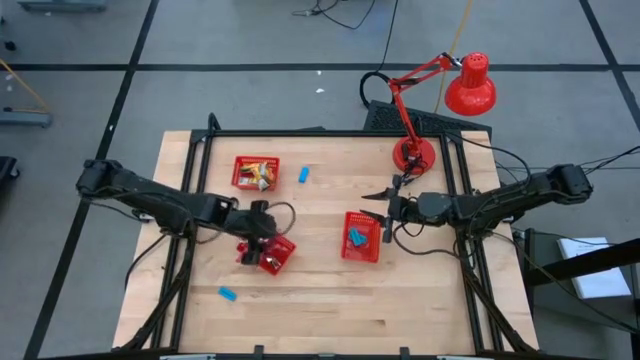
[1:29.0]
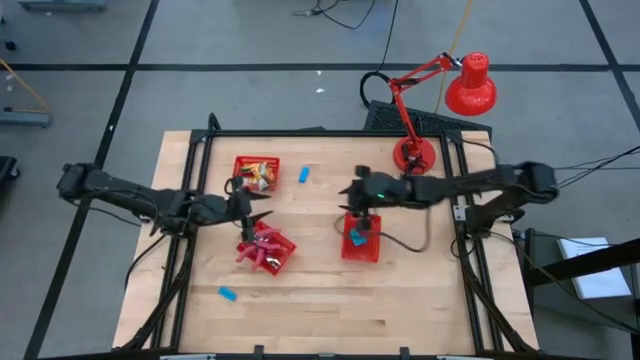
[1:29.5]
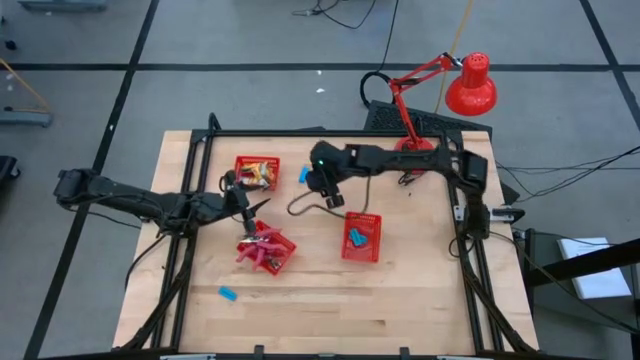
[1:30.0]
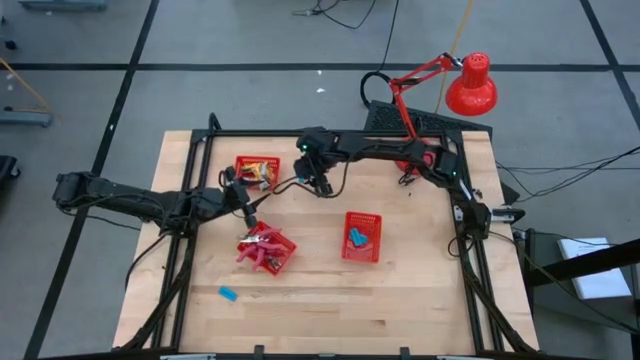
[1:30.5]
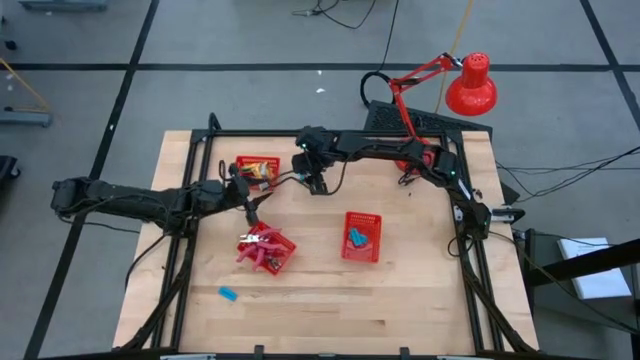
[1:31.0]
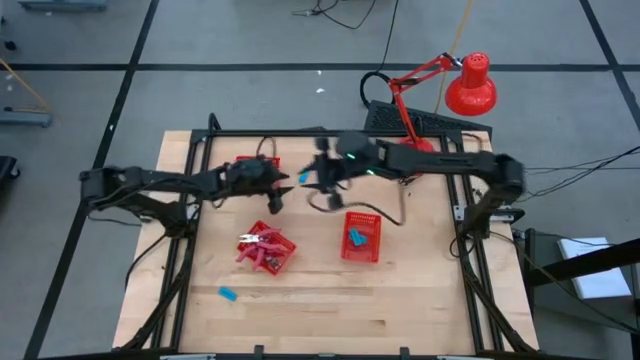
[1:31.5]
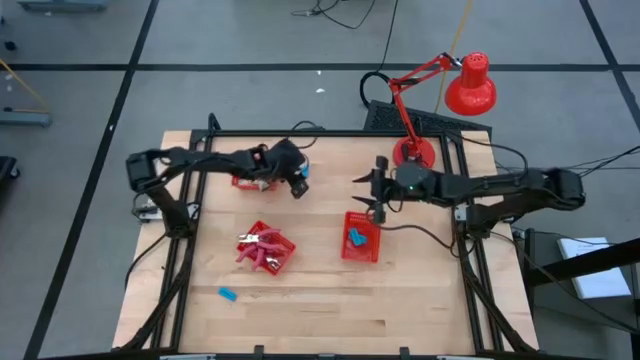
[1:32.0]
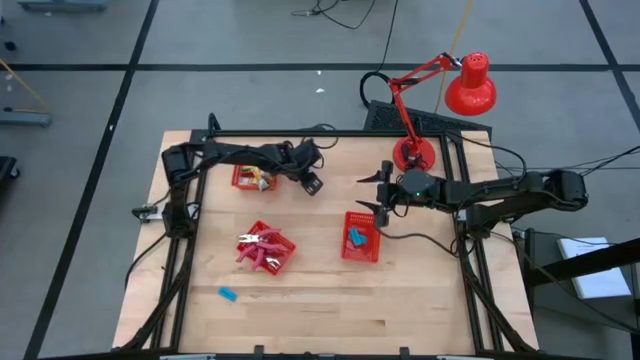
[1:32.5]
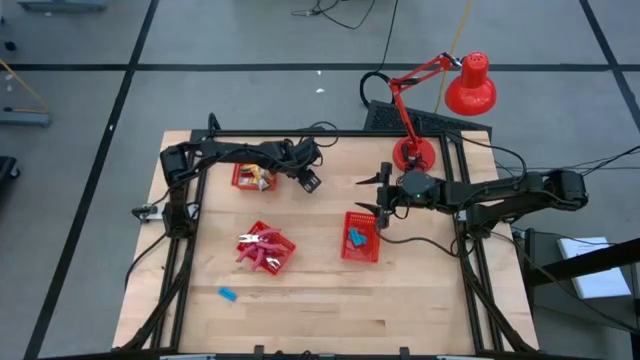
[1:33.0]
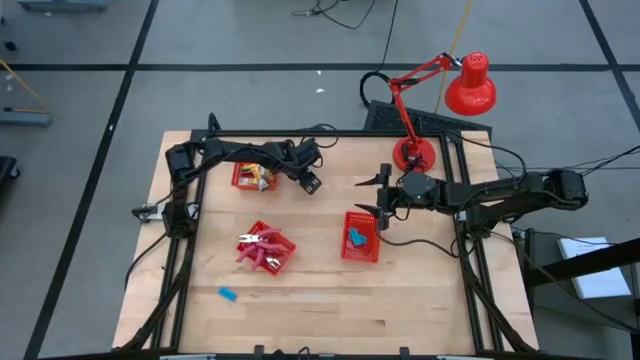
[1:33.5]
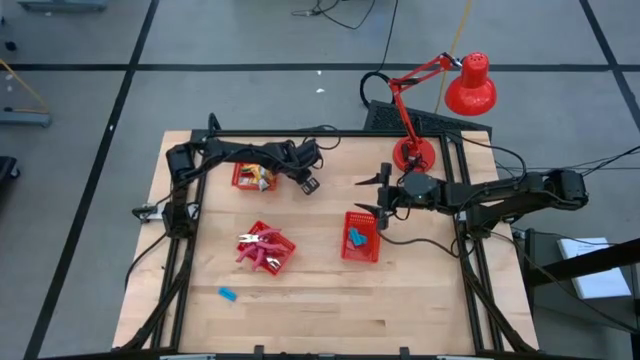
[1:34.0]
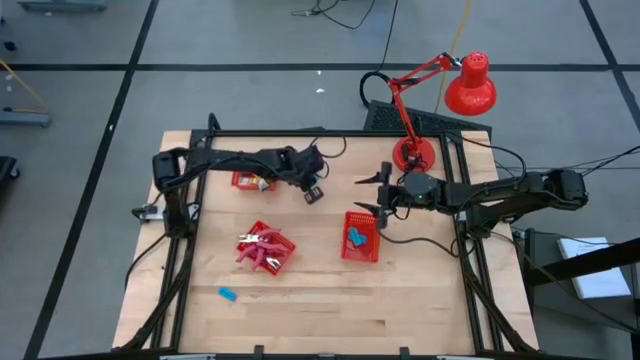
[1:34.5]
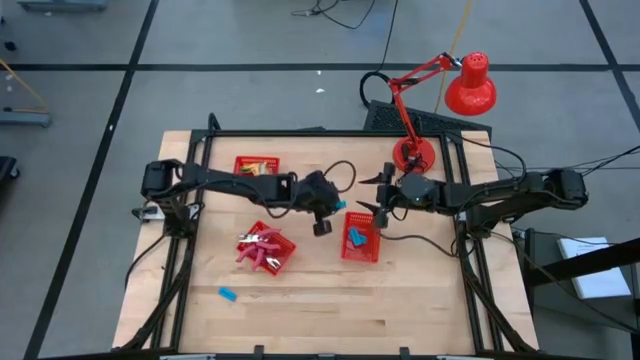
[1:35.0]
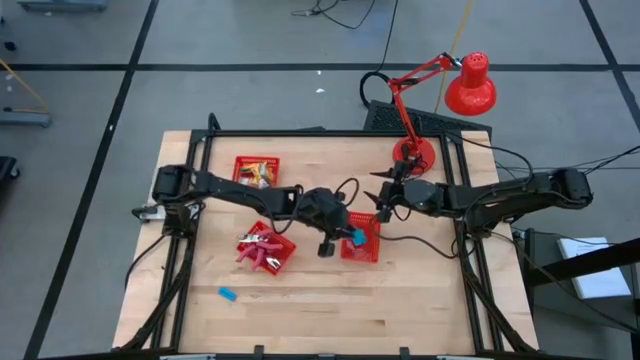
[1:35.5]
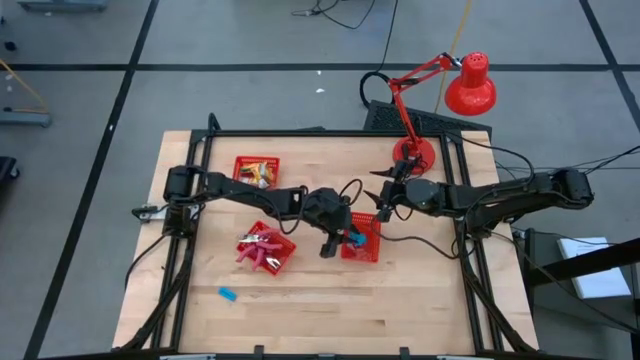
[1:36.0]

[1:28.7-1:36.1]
Task: Pick & Place School Supplies
Put the blue eraser into the bottom right red basket

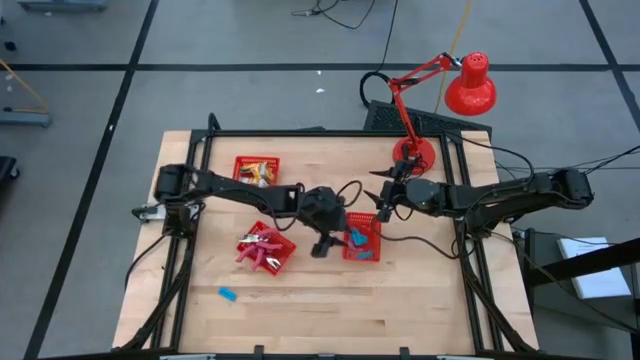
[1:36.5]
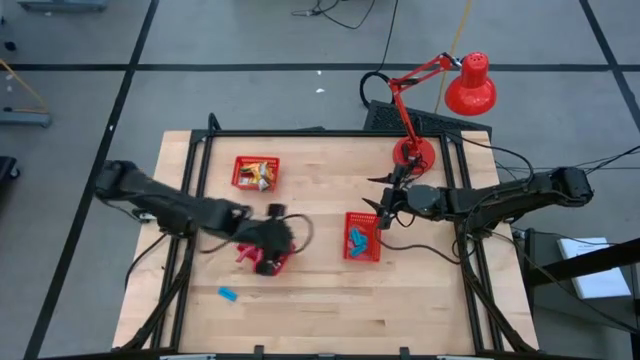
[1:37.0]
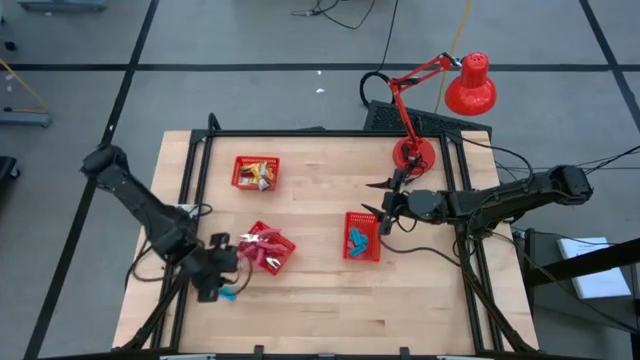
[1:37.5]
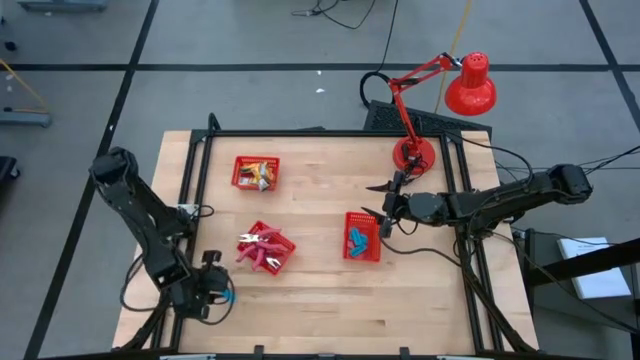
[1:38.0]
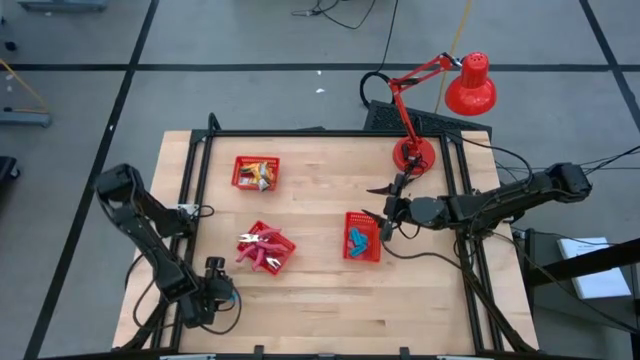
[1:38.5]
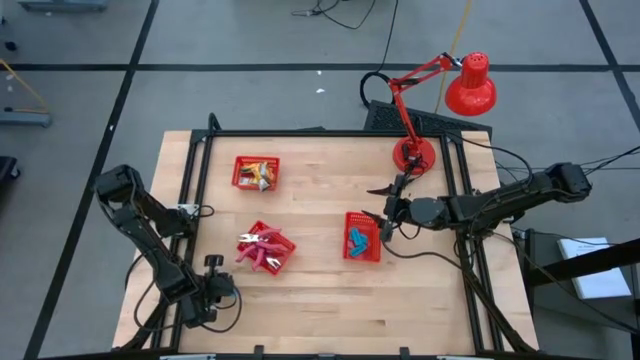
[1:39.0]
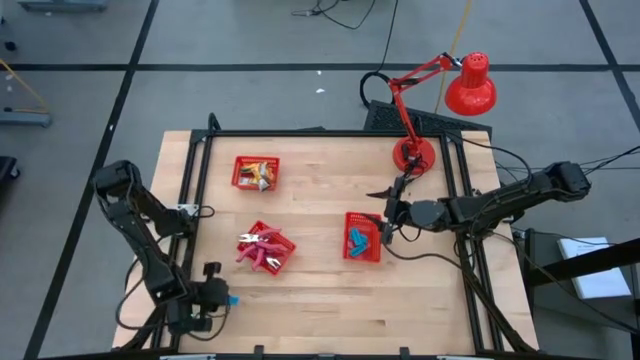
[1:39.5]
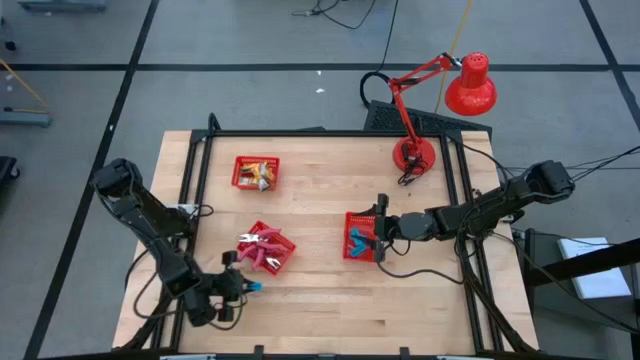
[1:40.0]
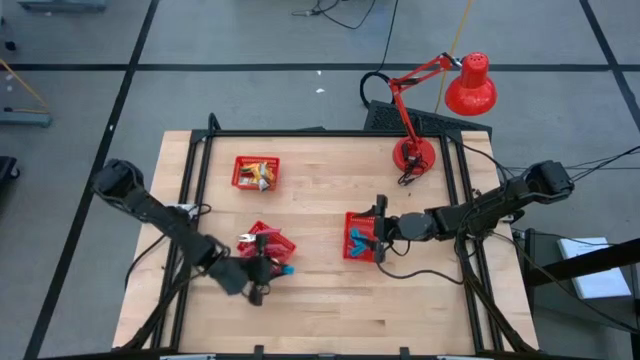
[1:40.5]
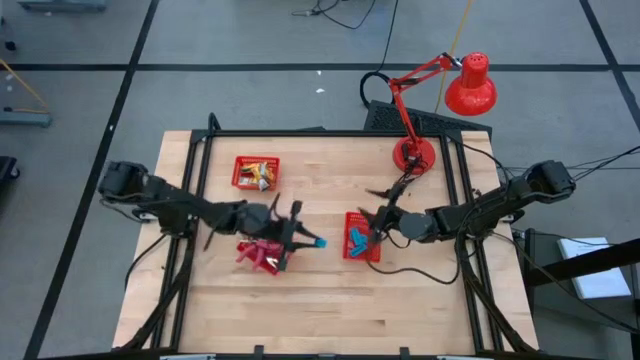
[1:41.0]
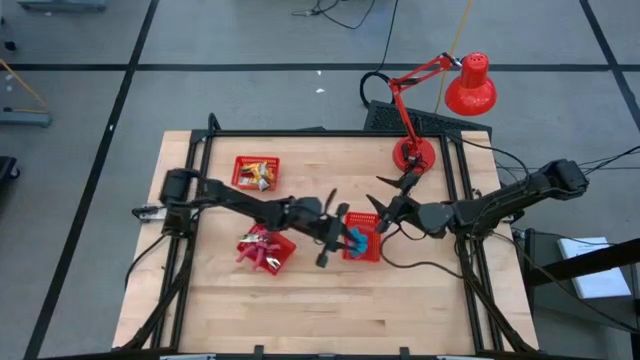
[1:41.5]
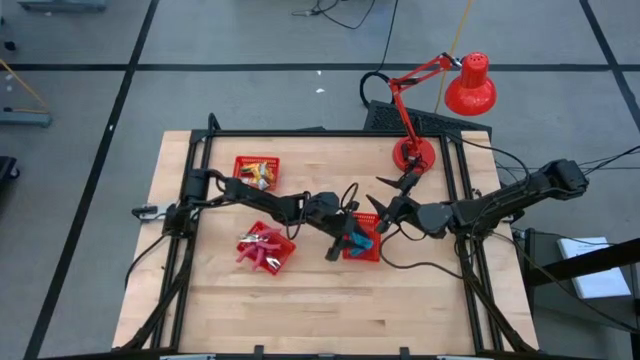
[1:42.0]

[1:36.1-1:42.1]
Put the blue eraser into the bottom right red basket

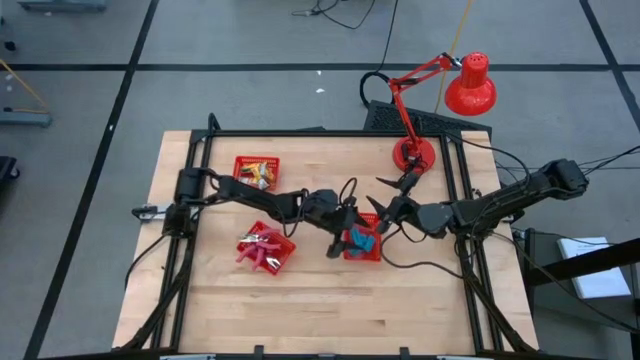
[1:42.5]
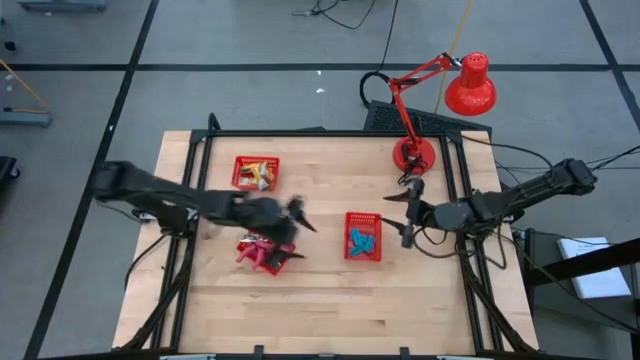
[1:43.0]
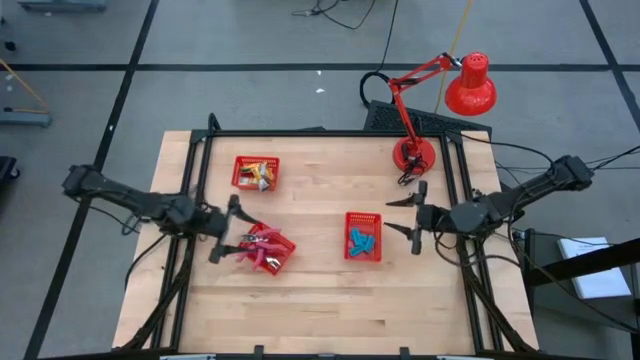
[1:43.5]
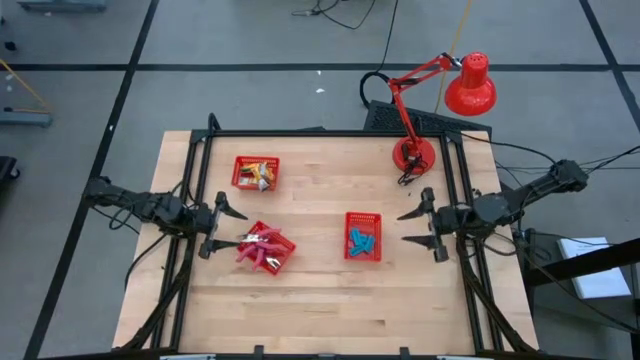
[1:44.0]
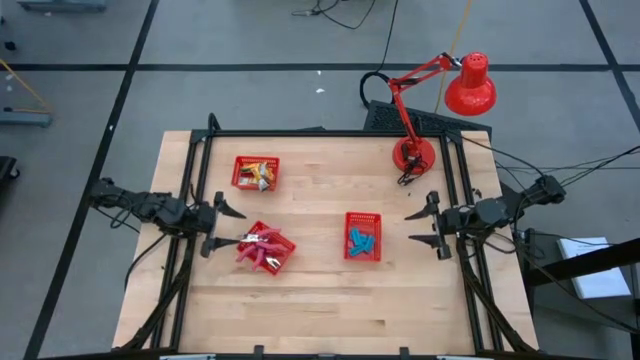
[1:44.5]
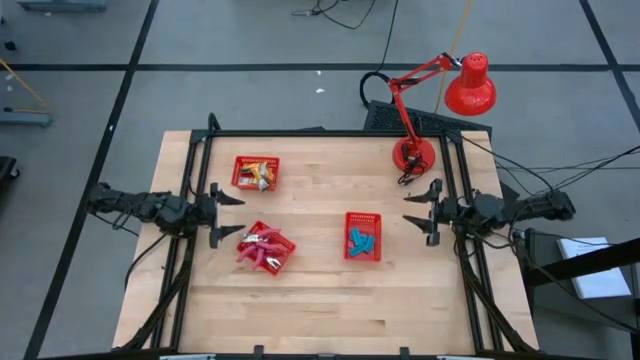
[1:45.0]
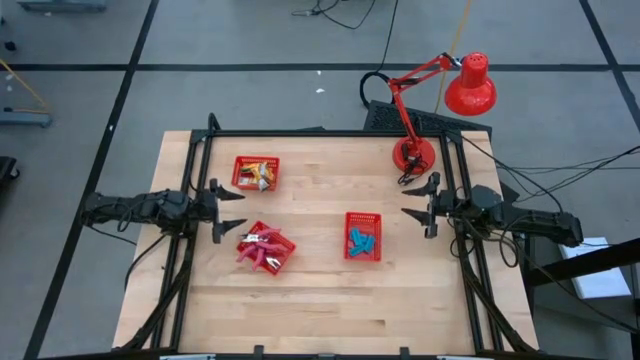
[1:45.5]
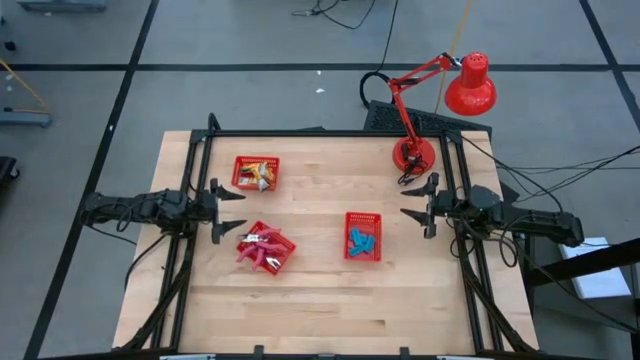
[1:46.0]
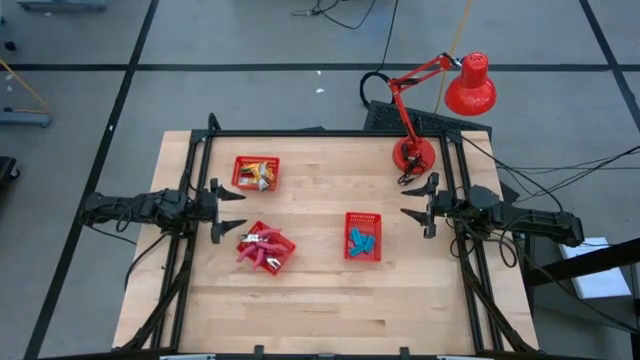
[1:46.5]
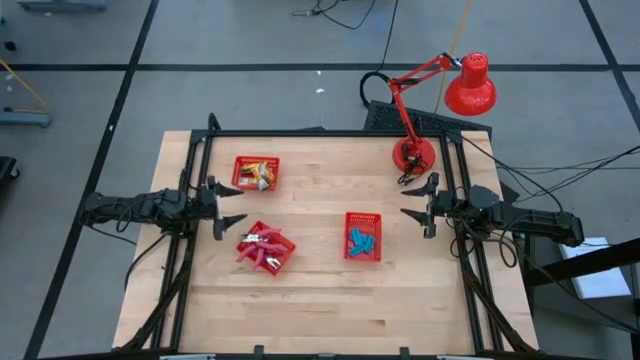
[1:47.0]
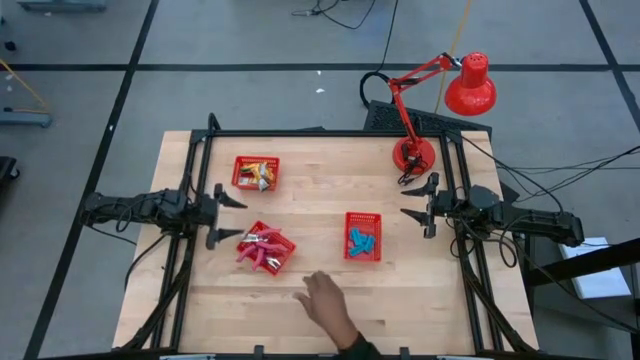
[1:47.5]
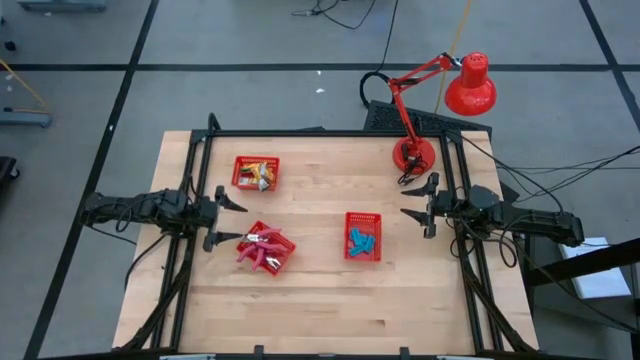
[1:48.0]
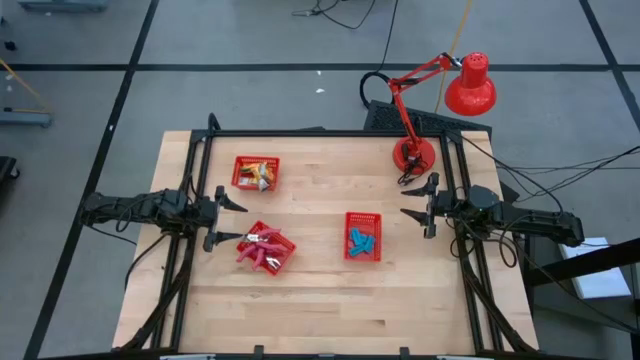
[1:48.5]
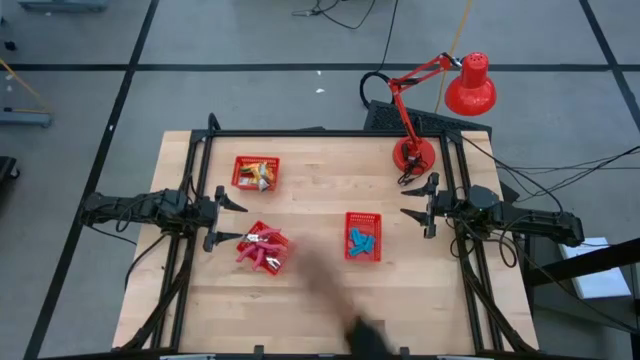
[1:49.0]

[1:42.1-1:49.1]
Return to Home Position
